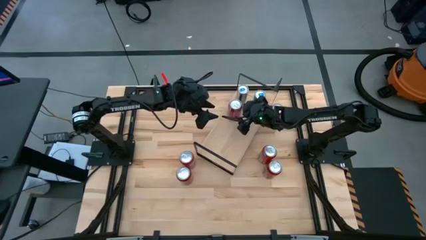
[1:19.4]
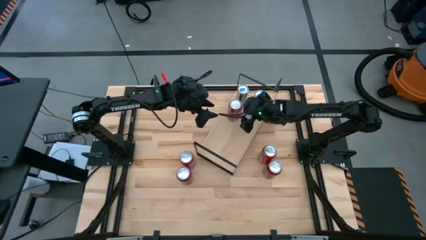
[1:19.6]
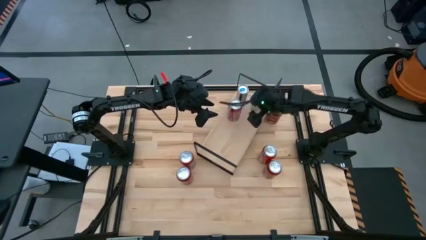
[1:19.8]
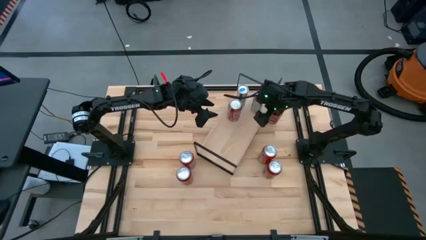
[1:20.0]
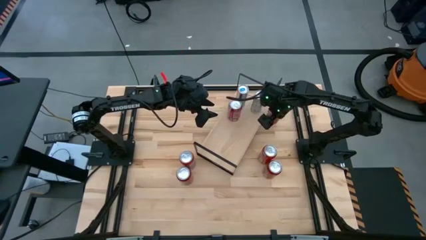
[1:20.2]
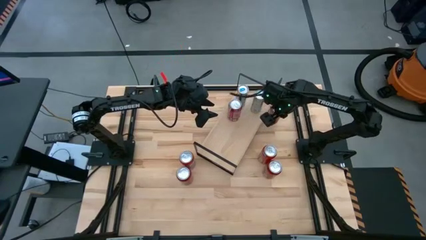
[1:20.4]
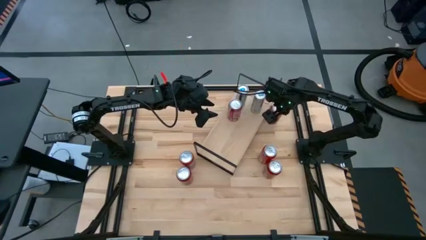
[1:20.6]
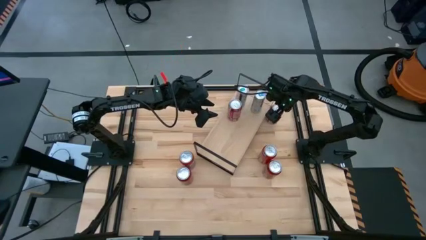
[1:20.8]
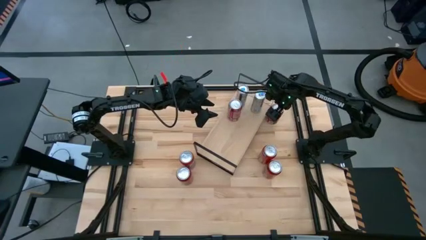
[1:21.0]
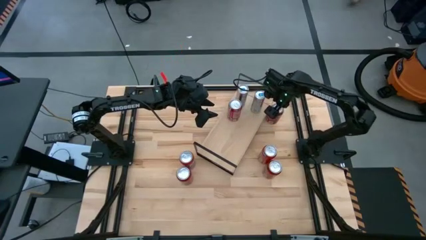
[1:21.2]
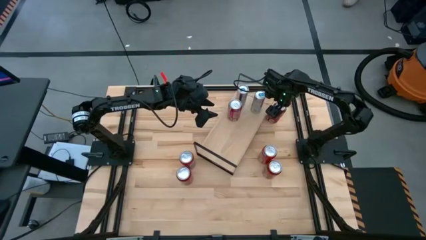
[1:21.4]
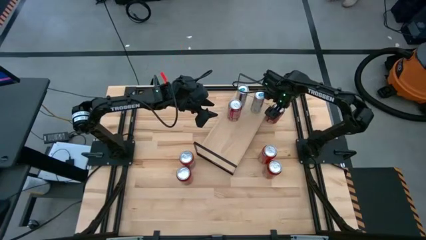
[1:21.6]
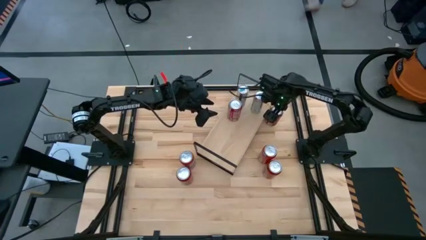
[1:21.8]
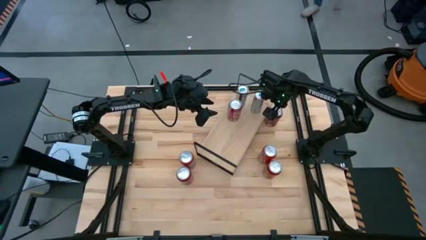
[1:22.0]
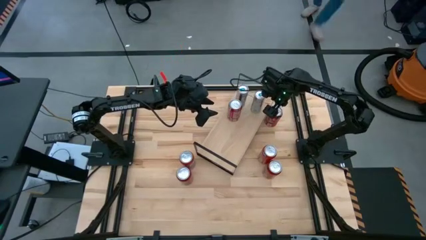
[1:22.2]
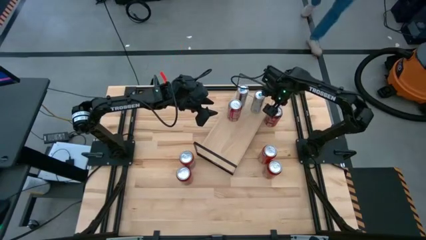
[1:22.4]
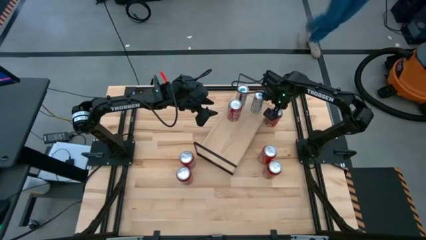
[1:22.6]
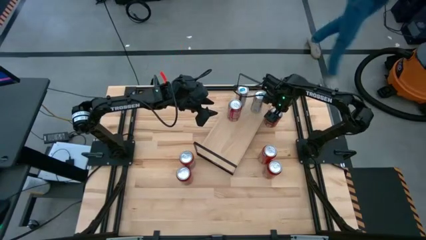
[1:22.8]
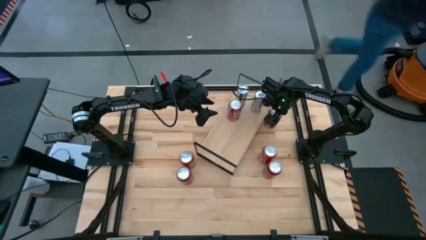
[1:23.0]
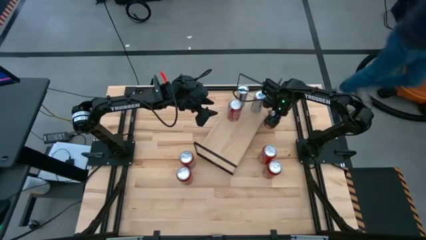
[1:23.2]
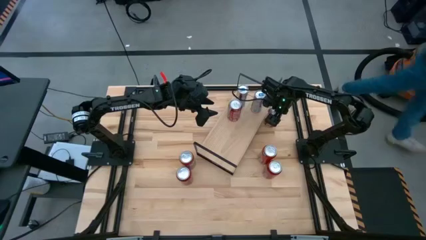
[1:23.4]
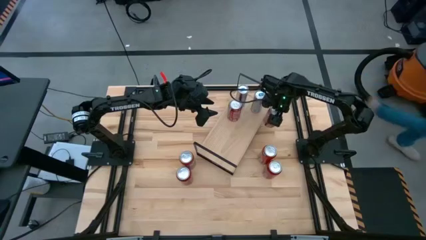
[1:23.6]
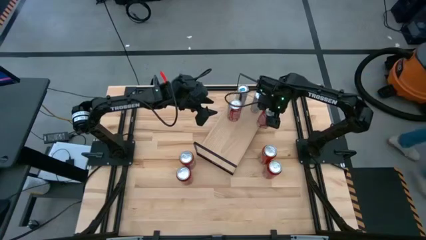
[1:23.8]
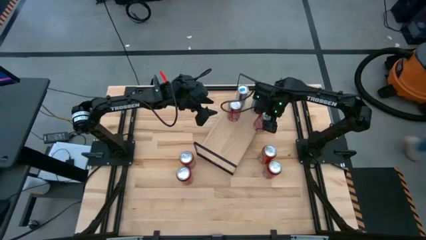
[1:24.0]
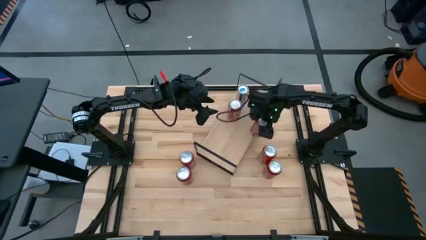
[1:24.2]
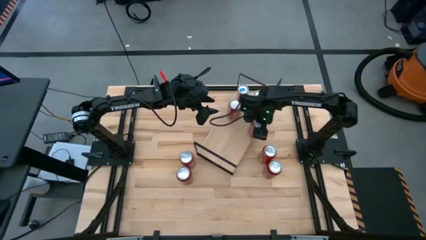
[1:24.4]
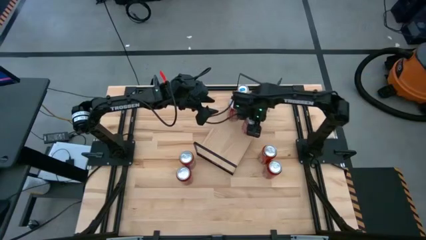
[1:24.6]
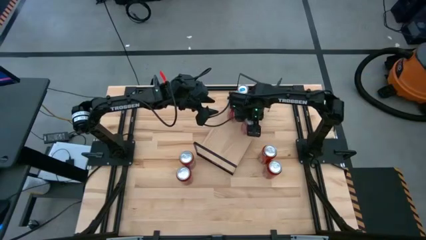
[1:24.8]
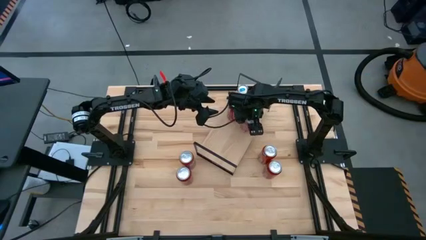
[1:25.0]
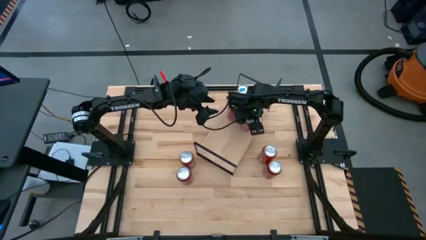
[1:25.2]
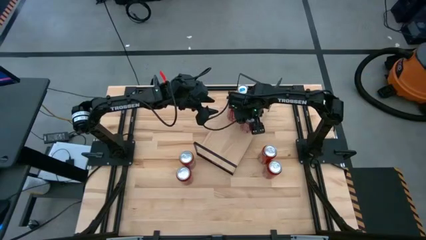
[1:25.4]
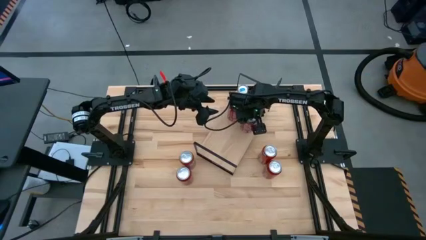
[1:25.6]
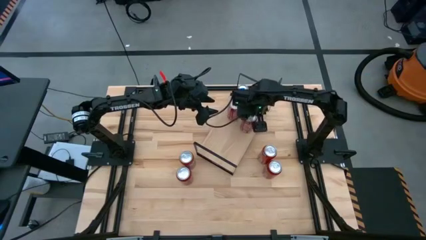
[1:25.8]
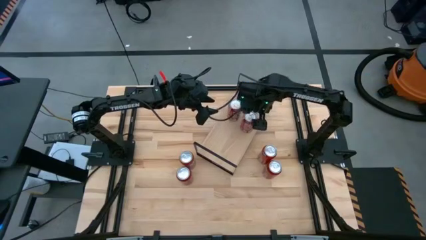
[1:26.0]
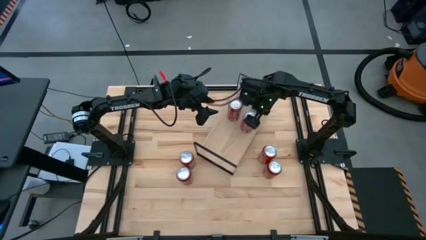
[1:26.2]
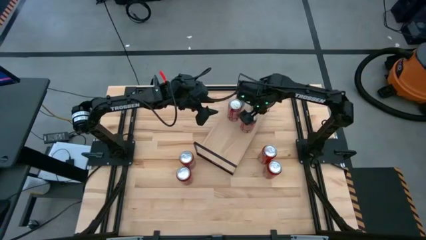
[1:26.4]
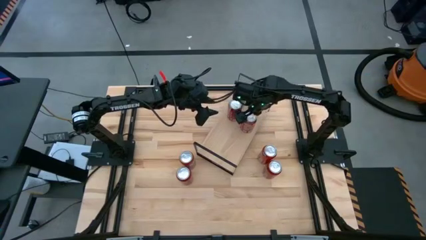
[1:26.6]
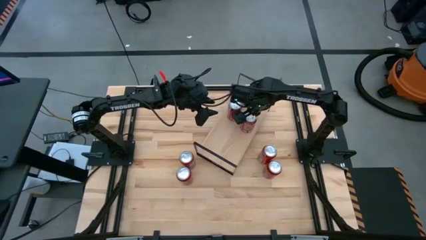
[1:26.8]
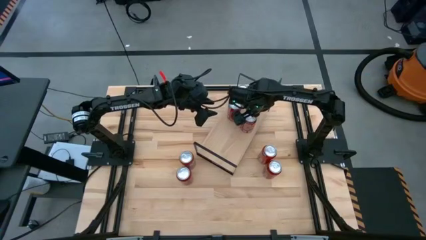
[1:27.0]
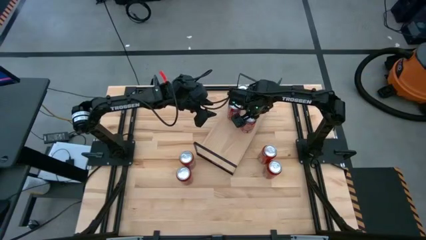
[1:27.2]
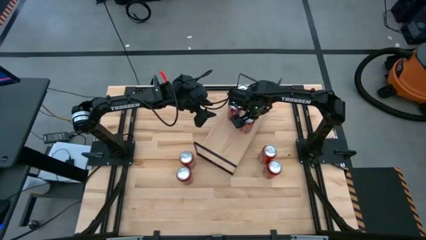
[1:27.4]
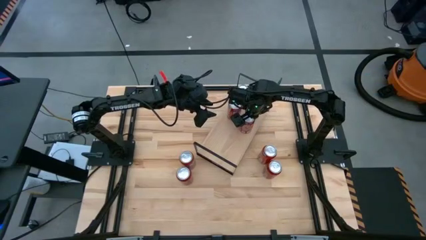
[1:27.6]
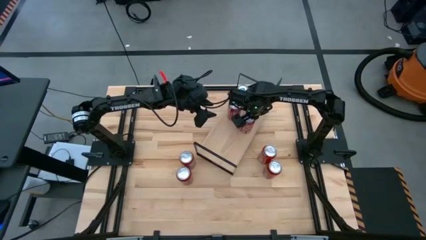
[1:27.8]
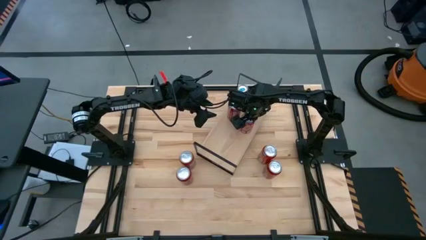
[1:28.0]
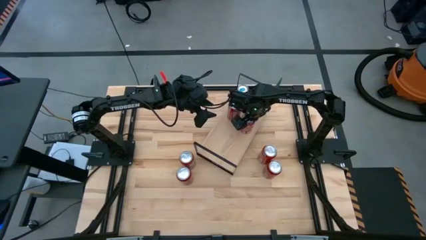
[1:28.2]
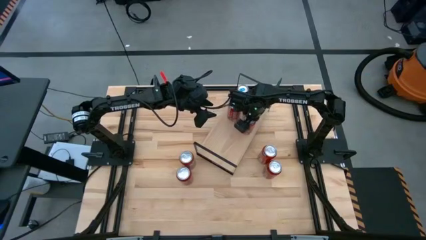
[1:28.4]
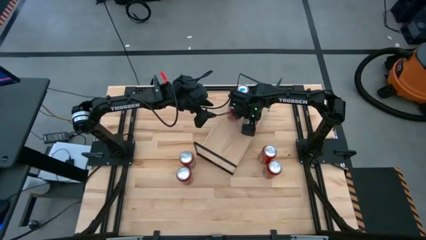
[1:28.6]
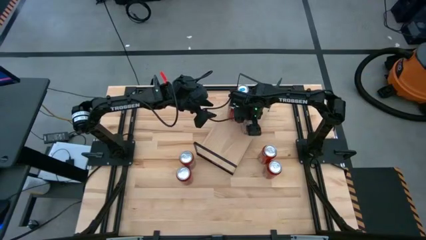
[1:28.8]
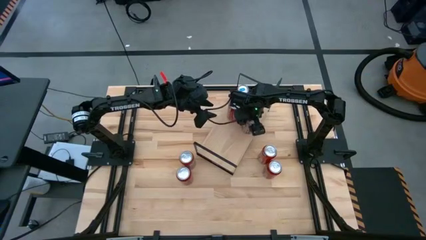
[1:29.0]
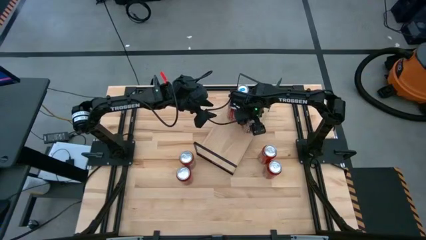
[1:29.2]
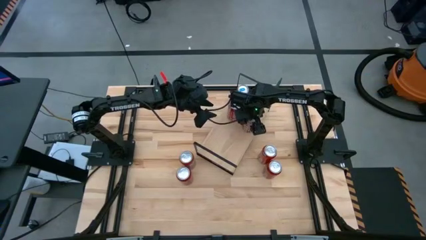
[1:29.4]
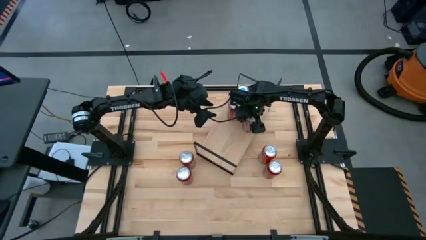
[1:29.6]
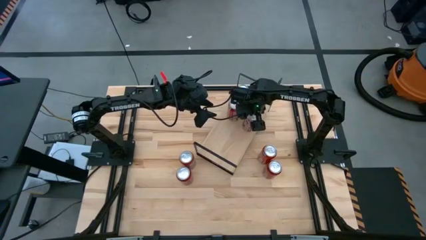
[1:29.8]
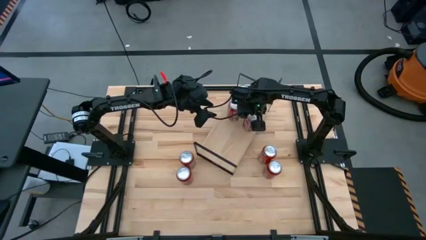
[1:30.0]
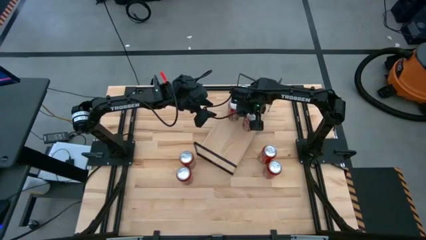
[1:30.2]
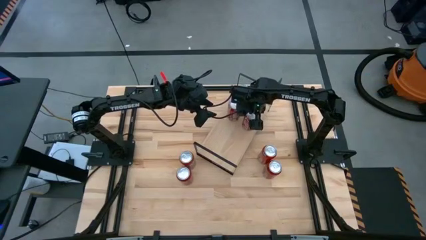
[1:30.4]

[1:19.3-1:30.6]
Task: Place canned beverage on shelf
Put the red-white soda can on the shelf aligned with the other red-white soda can

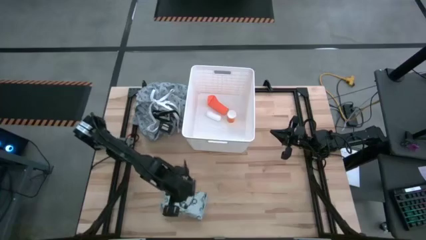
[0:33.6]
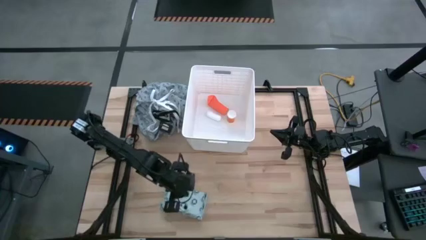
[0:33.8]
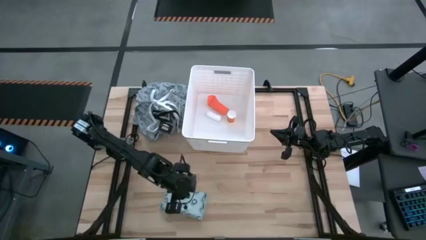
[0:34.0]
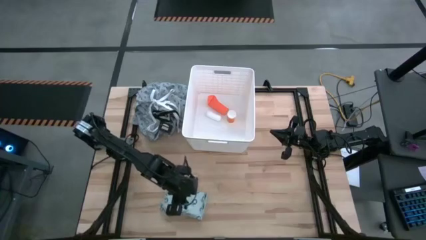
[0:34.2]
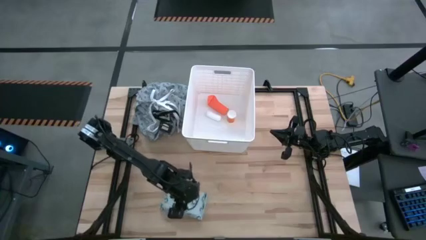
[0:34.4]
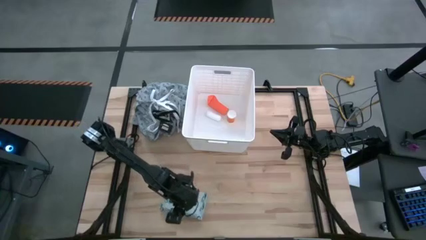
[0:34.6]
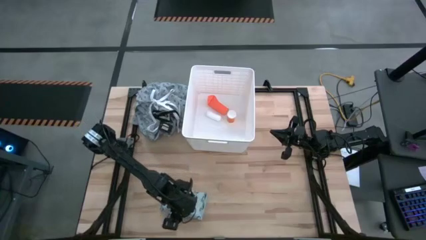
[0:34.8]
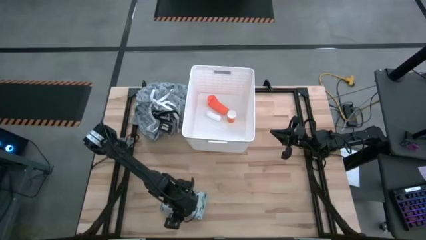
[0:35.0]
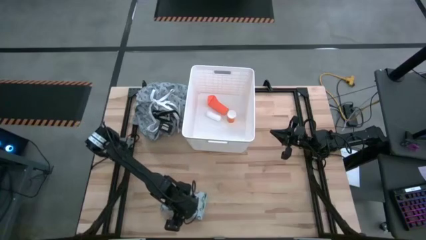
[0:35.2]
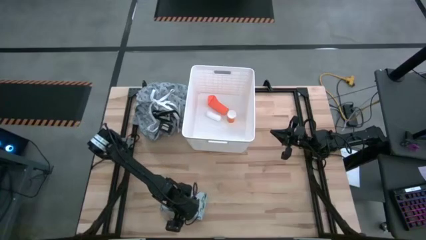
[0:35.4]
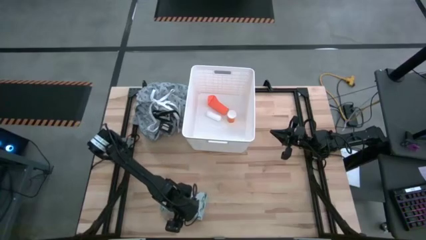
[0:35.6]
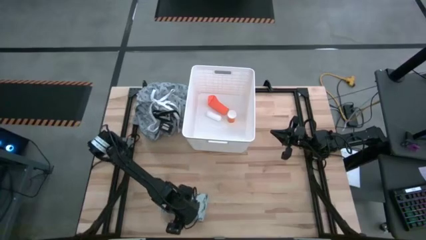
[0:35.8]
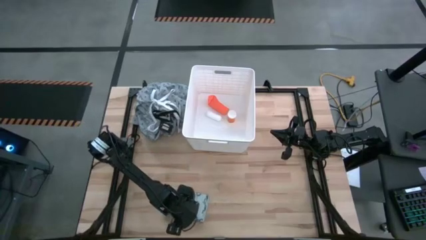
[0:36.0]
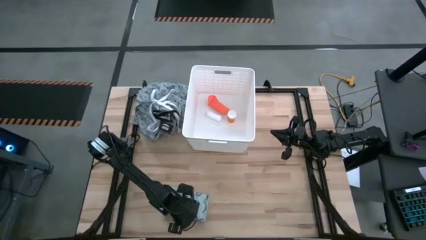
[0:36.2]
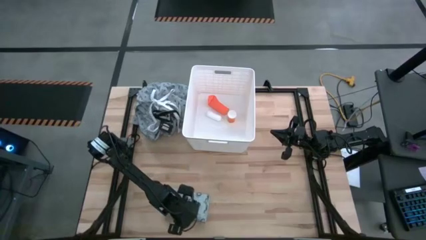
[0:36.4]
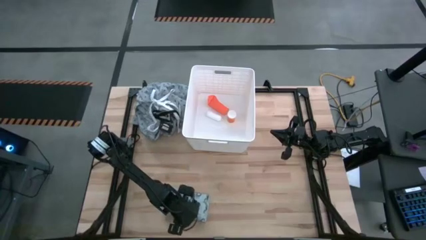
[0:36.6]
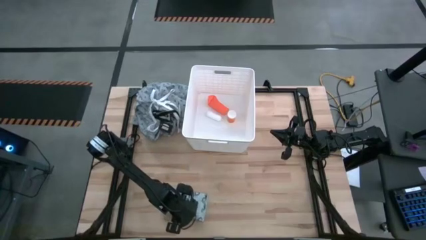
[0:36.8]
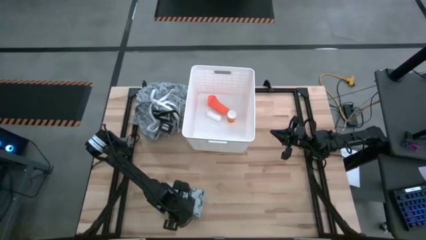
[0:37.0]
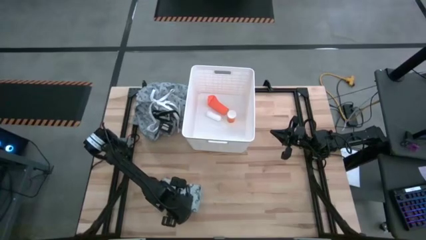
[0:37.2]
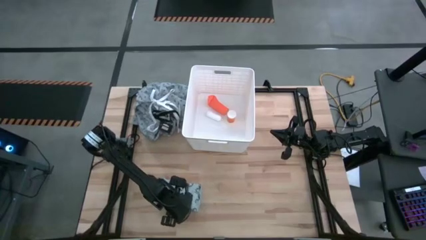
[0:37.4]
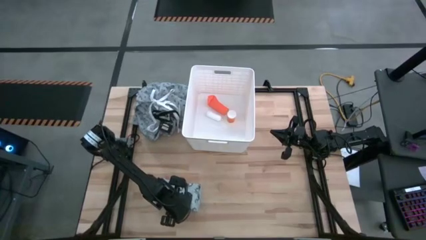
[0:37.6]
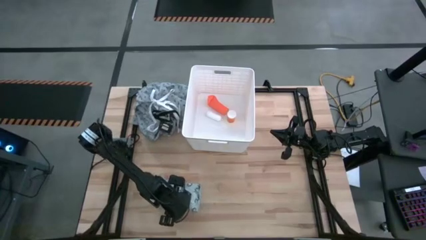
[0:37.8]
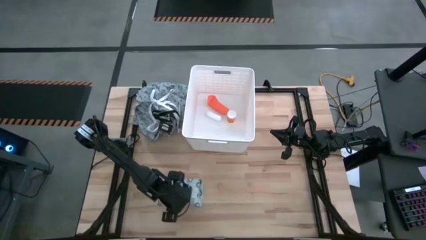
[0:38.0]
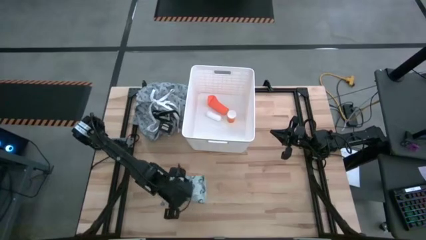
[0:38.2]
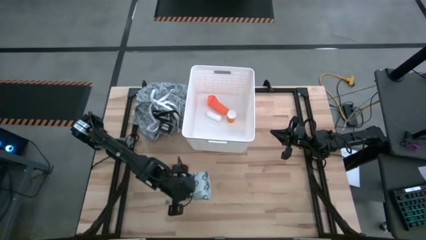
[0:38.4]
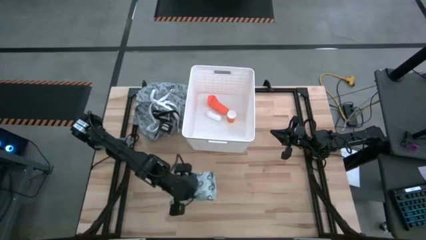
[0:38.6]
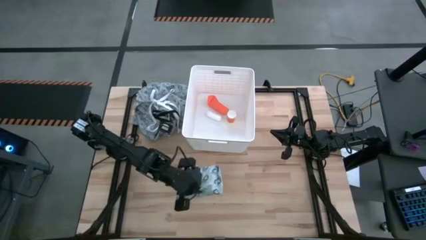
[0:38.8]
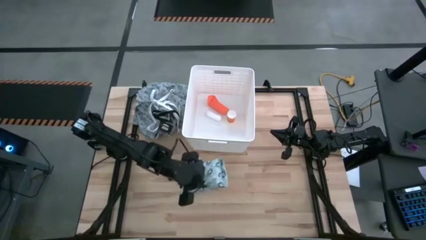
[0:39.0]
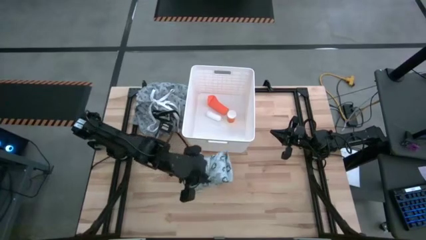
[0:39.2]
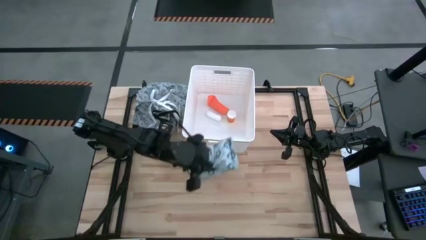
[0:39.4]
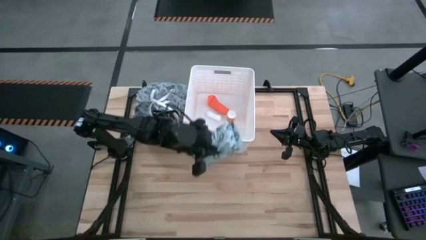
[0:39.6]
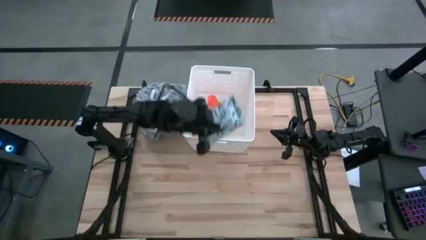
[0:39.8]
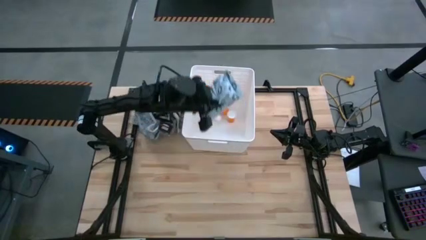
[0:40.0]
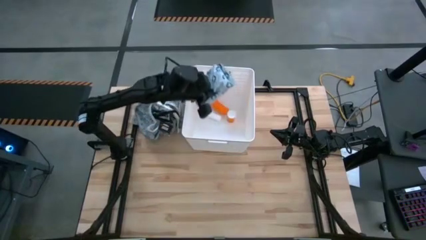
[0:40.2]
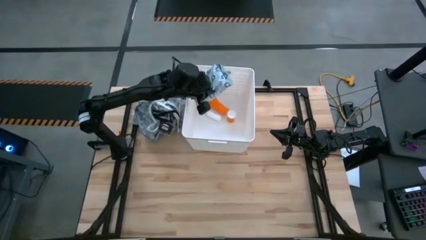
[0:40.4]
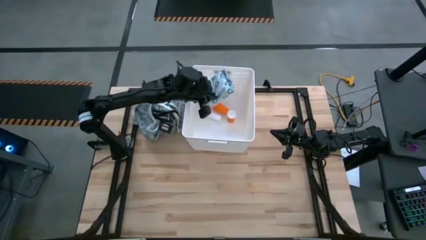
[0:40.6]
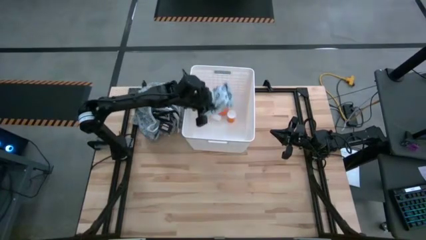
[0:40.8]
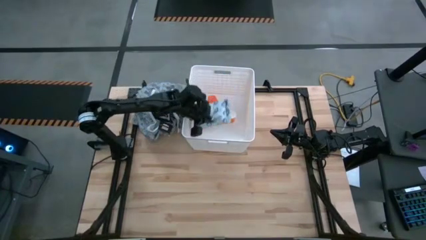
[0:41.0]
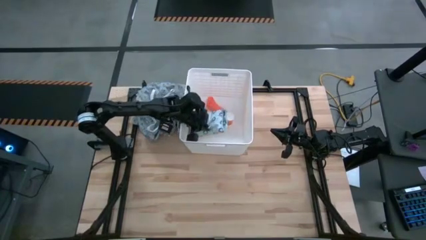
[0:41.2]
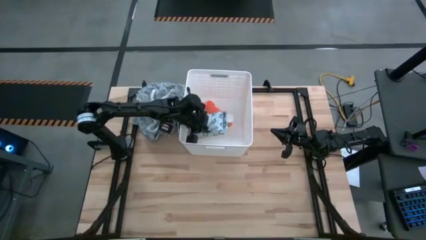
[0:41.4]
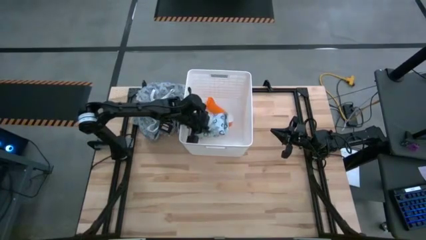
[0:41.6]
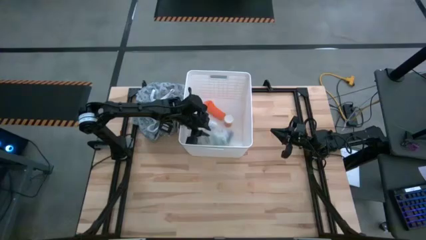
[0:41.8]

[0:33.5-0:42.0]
Task: Pick & place medical supplies in basket/bin
Put the white bag into the white bin
